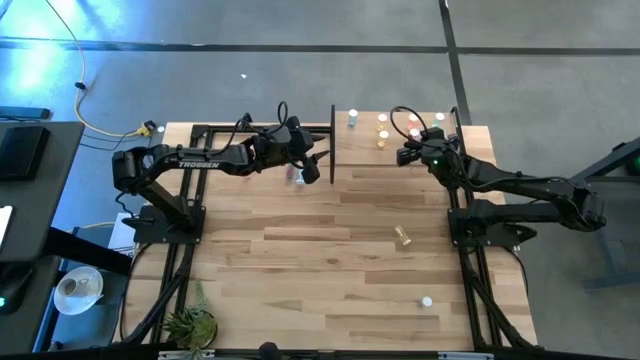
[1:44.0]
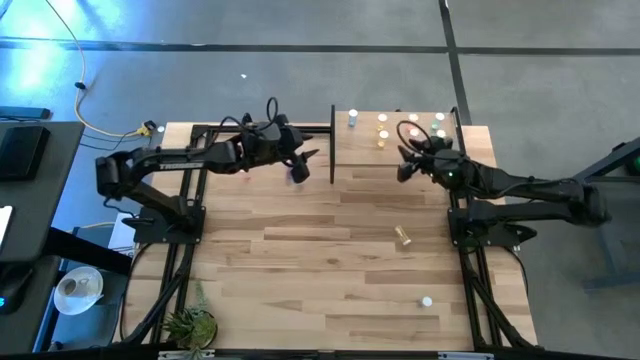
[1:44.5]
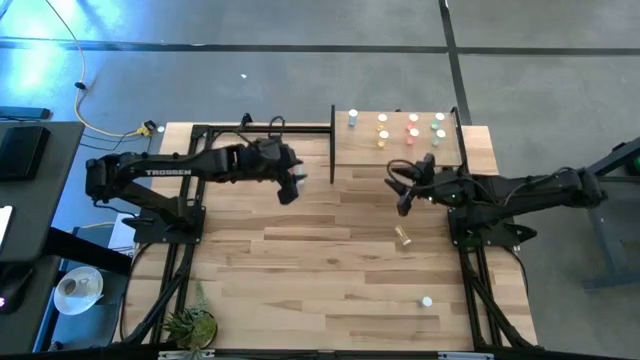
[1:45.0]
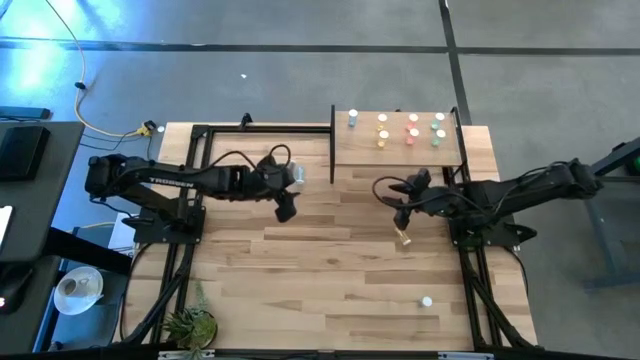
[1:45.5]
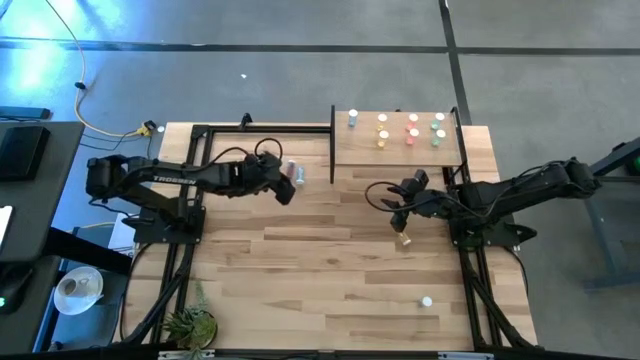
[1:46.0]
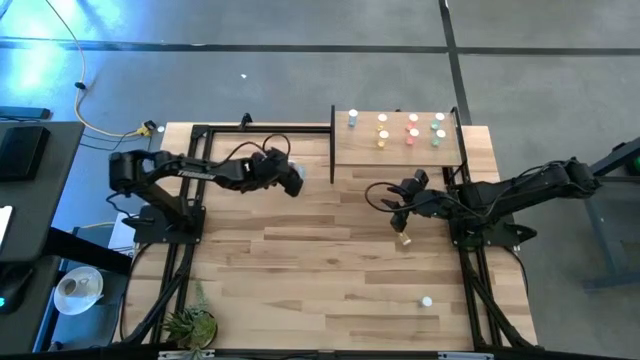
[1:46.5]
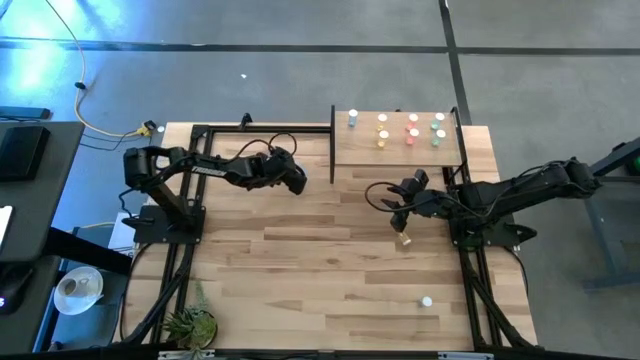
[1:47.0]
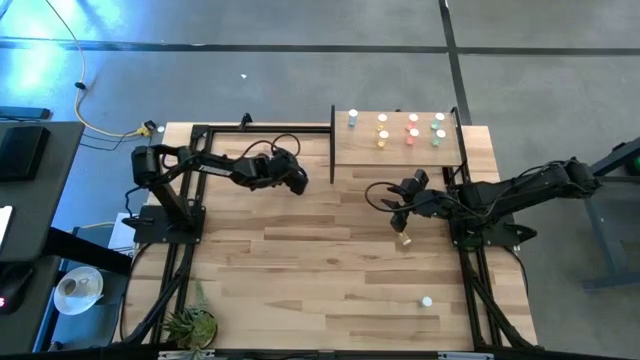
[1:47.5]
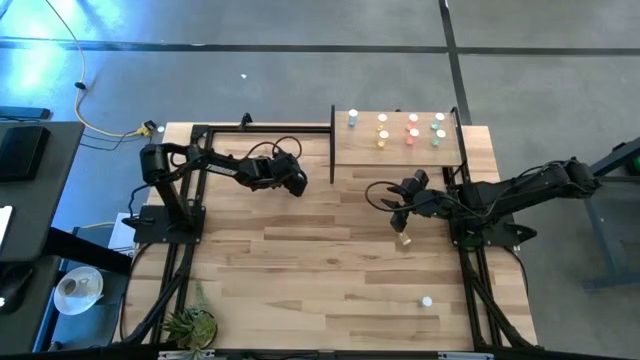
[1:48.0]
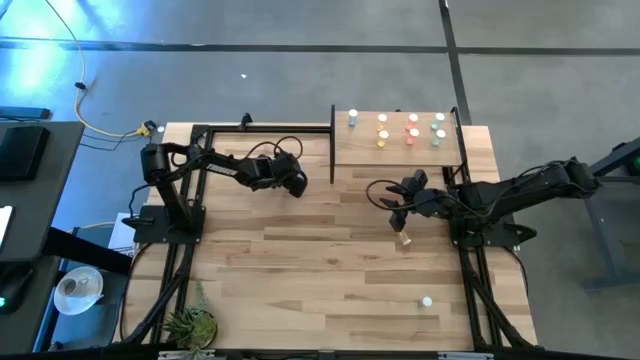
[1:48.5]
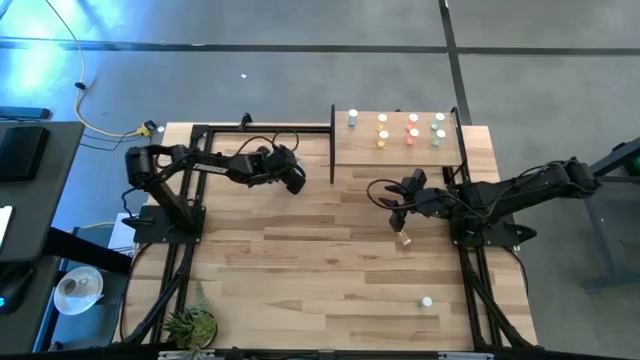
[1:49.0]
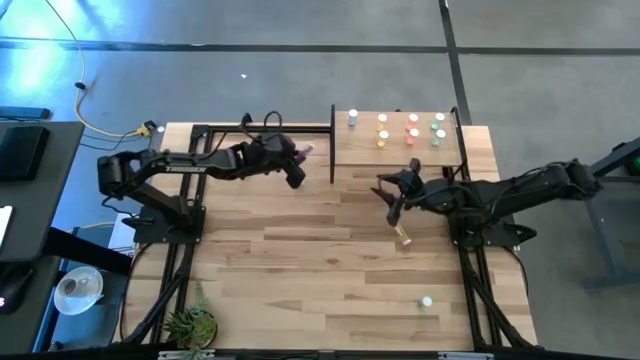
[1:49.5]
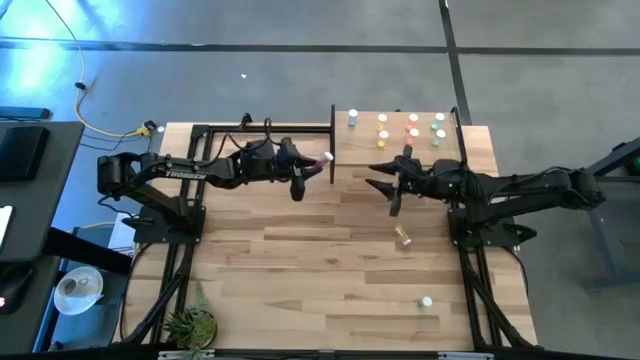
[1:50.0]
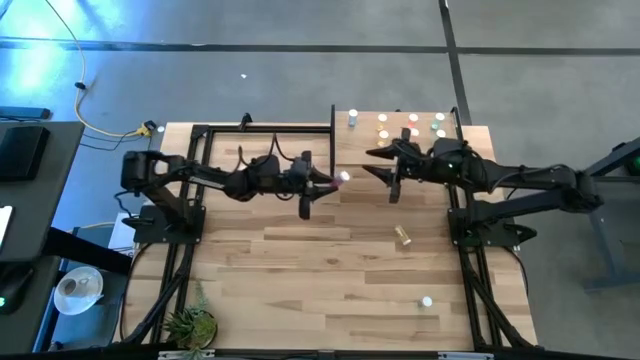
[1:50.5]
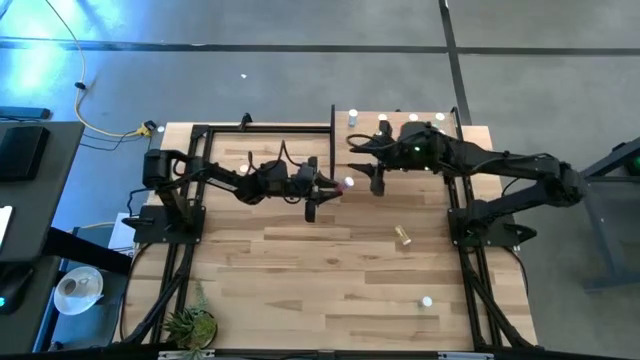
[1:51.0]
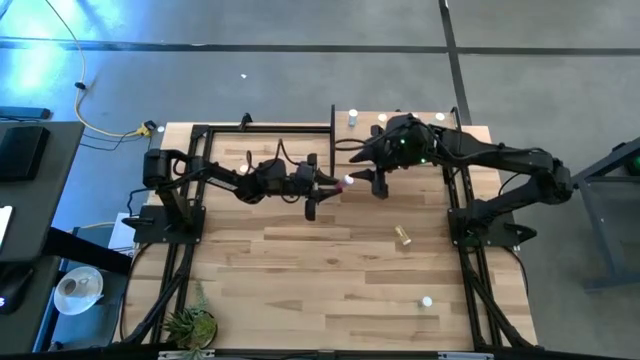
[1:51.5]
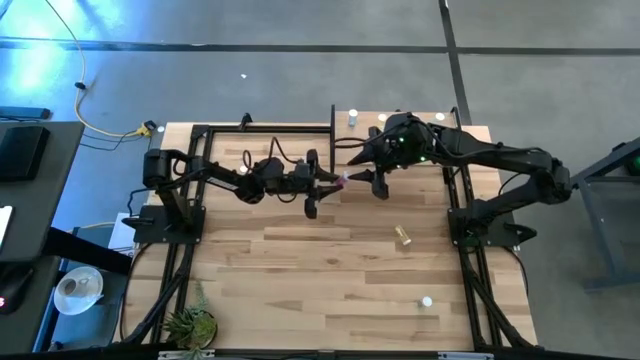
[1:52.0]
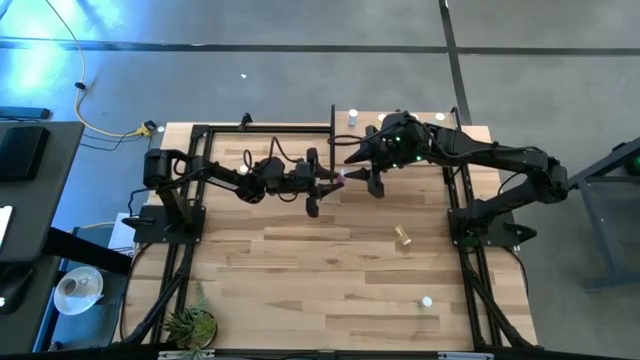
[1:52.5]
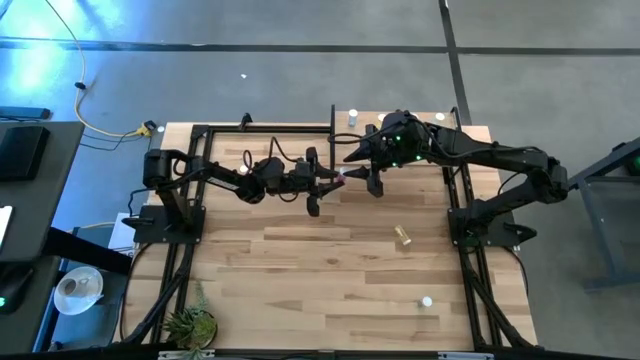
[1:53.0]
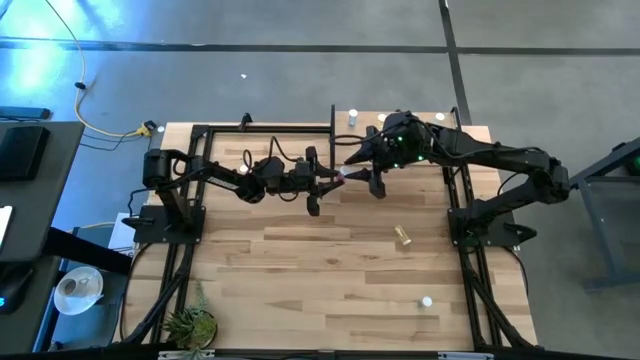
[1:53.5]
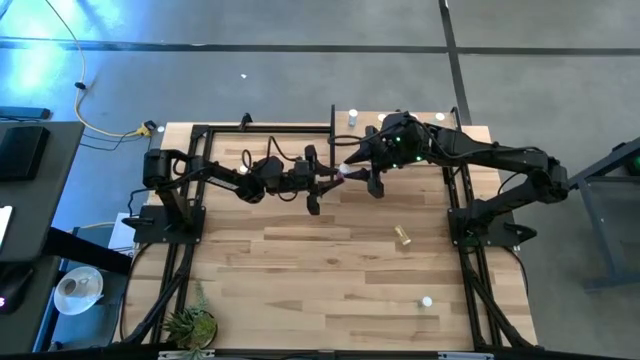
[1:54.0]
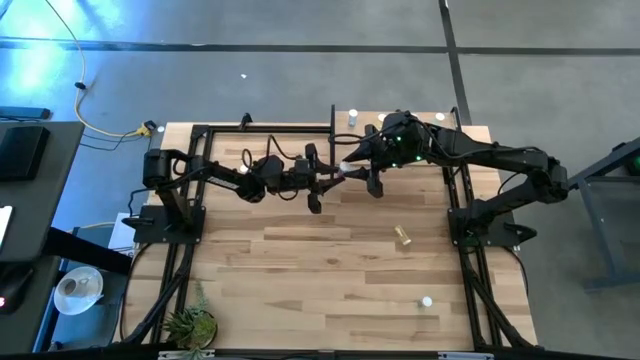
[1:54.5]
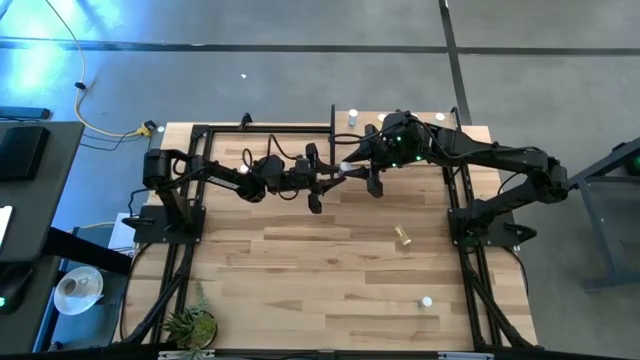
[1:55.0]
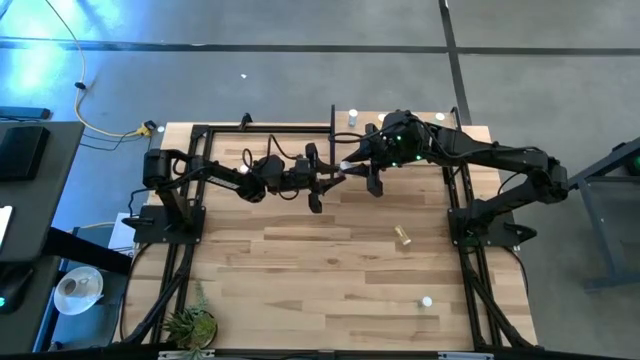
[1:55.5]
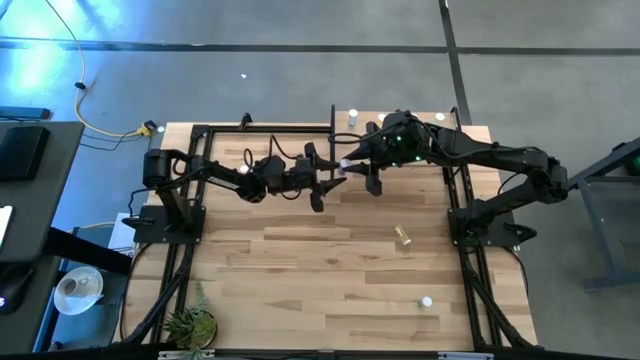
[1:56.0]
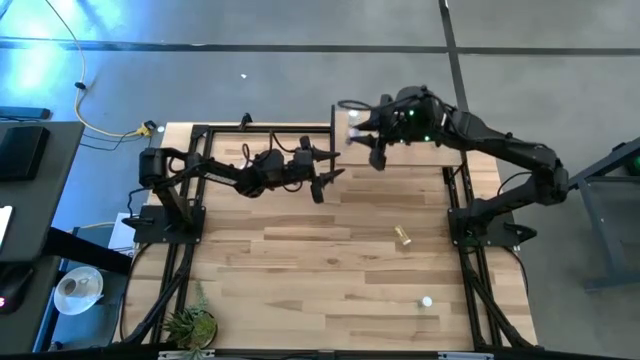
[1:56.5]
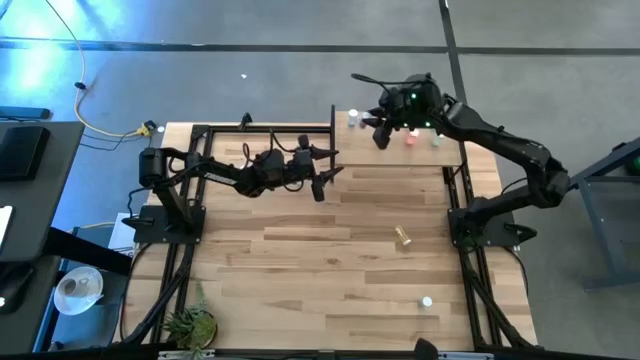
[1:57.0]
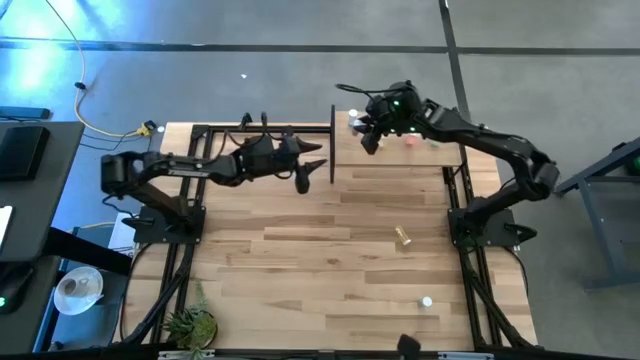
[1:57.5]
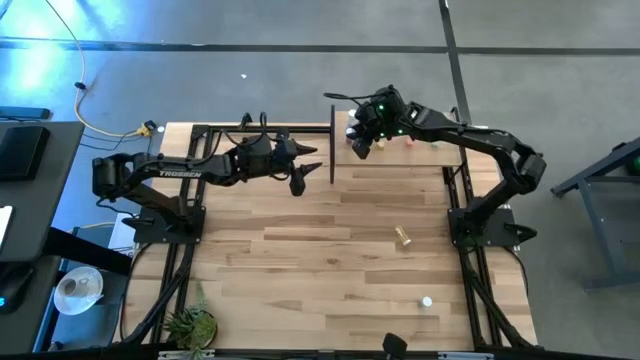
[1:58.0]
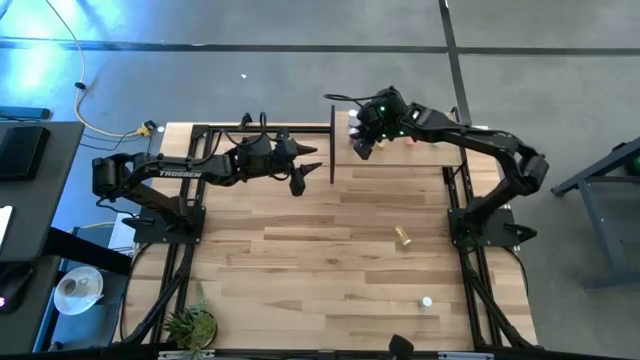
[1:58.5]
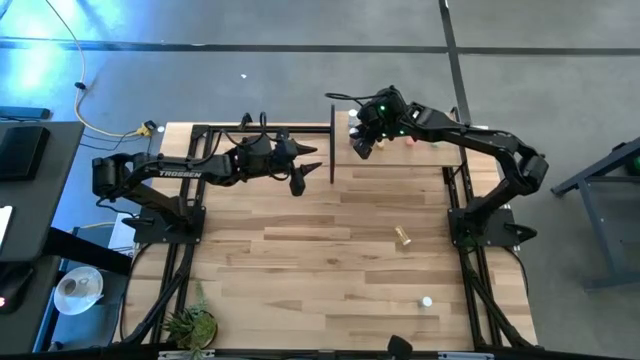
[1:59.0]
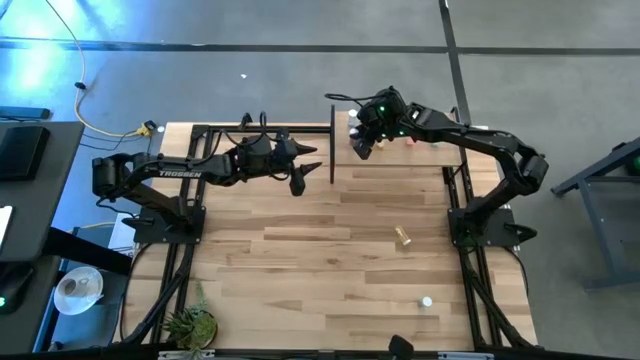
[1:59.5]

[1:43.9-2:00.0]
Task: Pick and place medicine bottles onto shelf by color
Put the left blue medicine bottle aligned with the other blue medicine bottle on the shelf

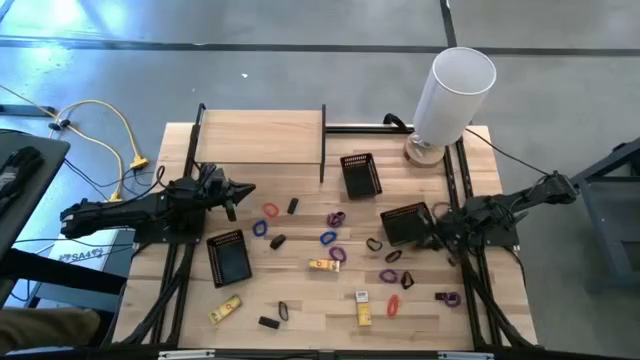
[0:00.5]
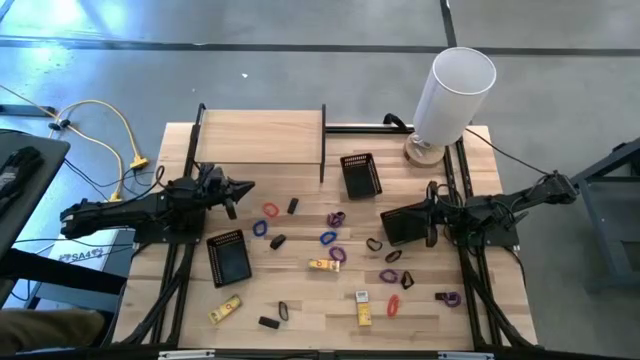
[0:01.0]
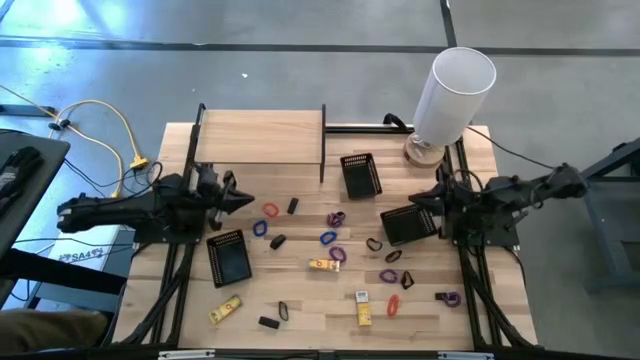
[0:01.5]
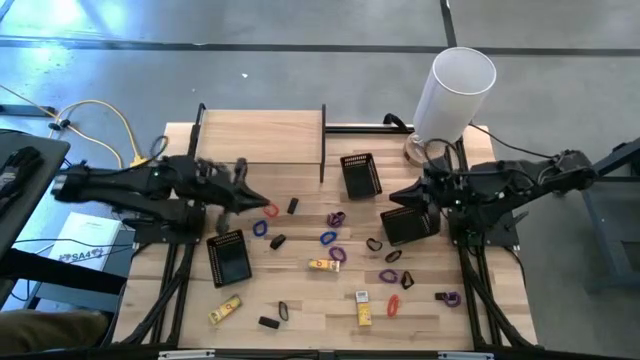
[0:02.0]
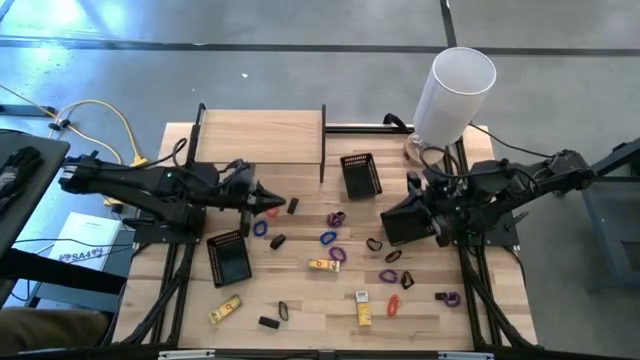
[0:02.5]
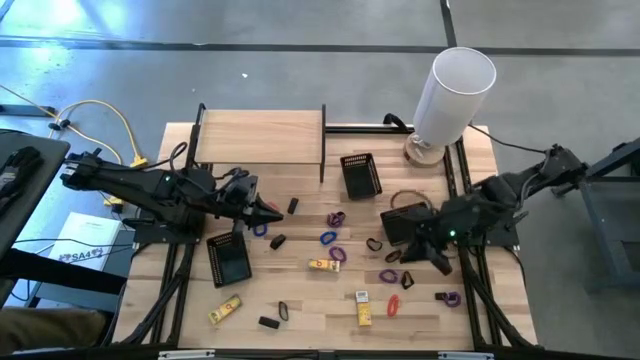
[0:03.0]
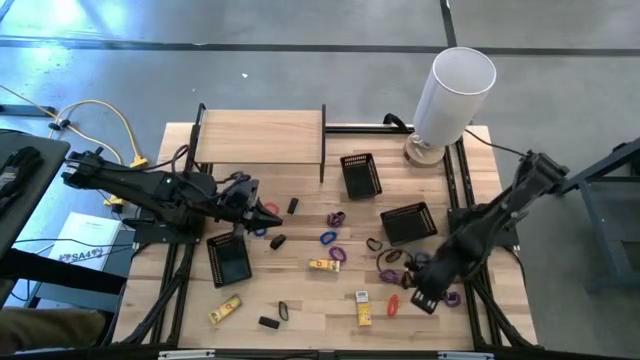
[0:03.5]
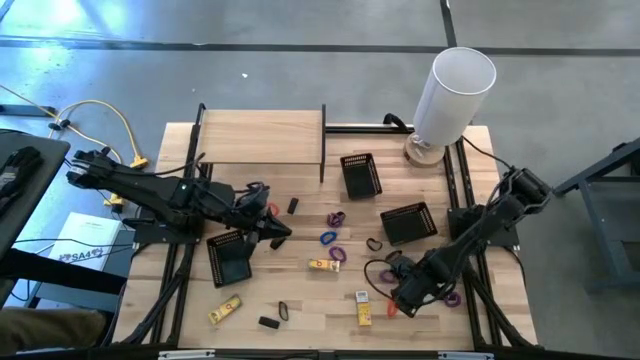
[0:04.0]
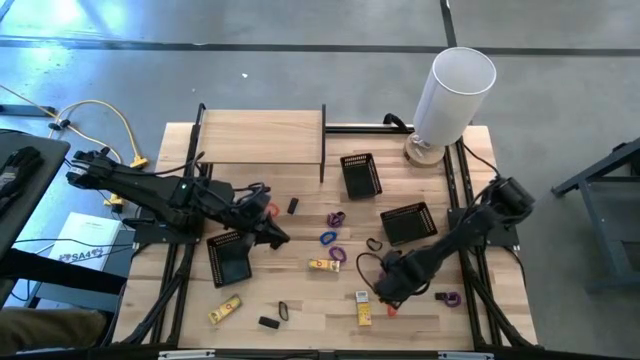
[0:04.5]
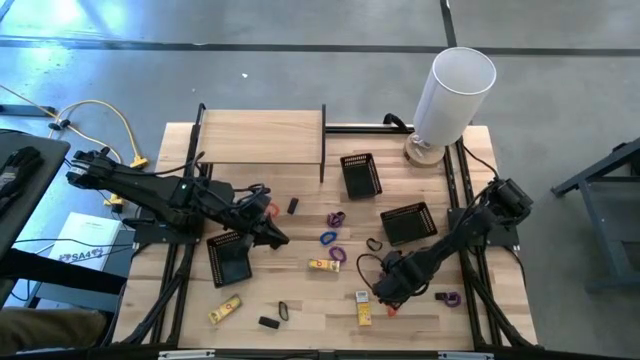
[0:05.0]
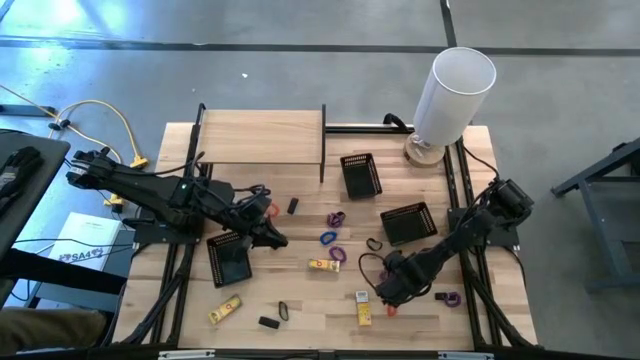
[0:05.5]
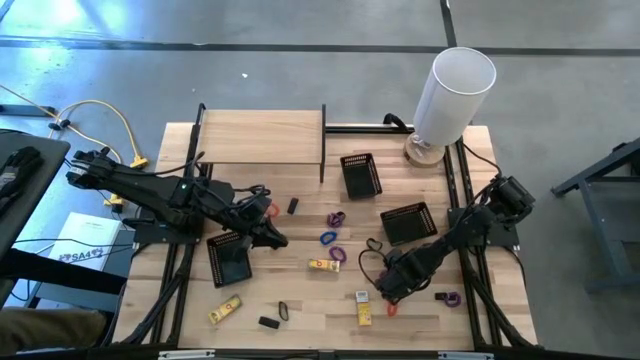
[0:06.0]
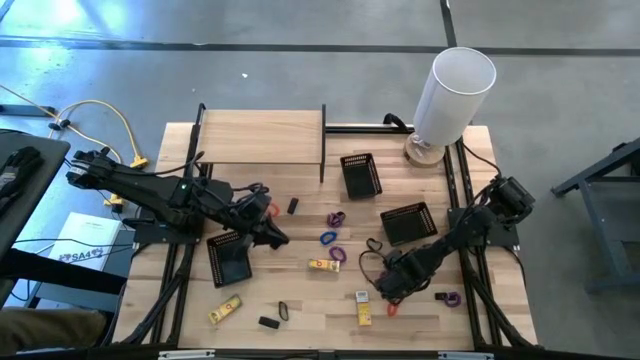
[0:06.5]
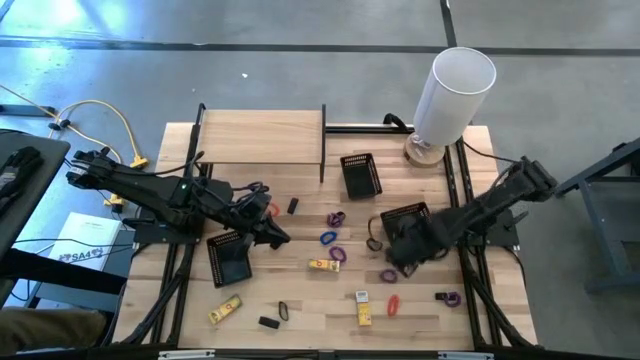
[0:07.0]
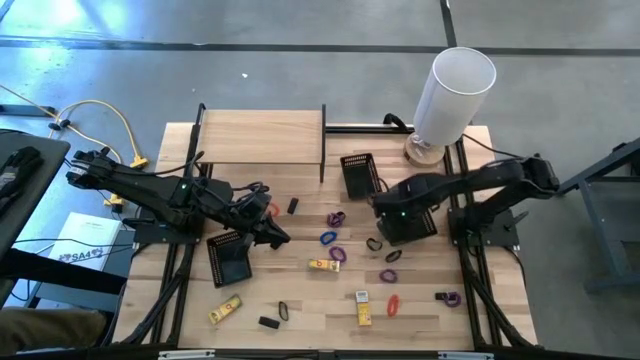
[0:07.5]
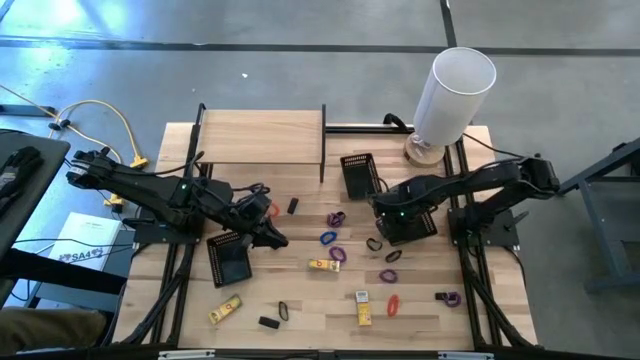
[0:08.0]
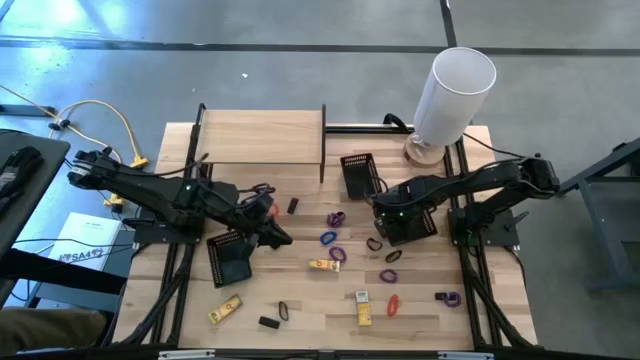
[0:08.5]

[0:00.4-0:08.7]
Task: Pick & Place Office Desk Supplies
Put the black rubberband into the bottom right black bin
